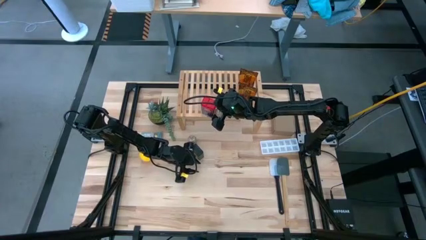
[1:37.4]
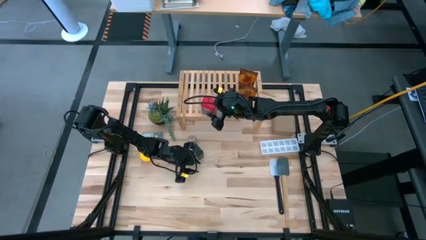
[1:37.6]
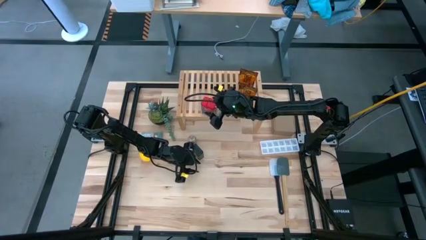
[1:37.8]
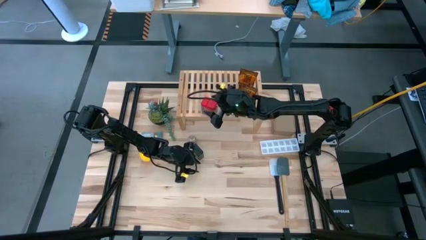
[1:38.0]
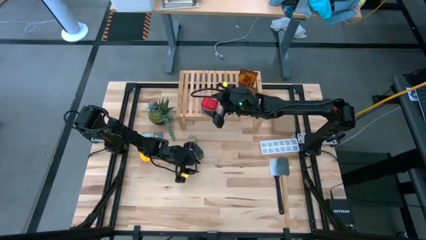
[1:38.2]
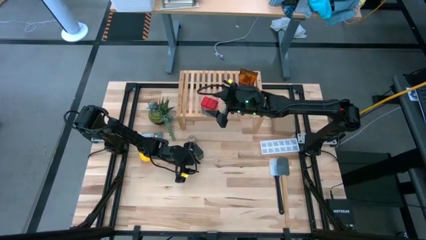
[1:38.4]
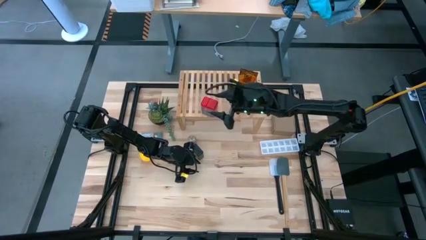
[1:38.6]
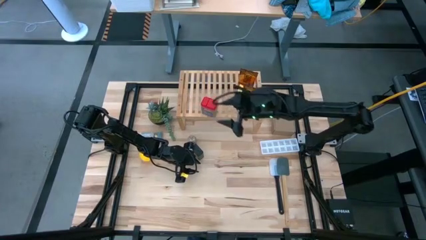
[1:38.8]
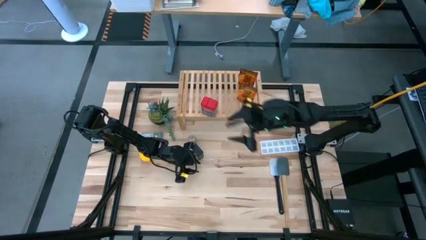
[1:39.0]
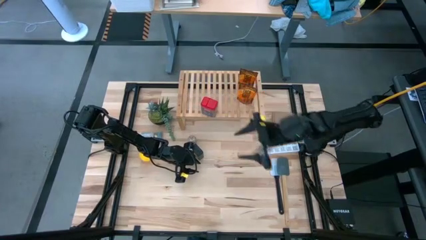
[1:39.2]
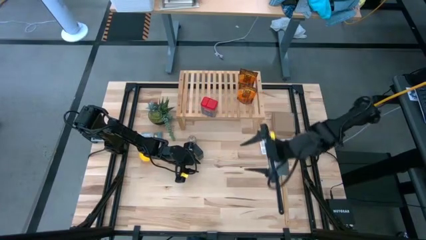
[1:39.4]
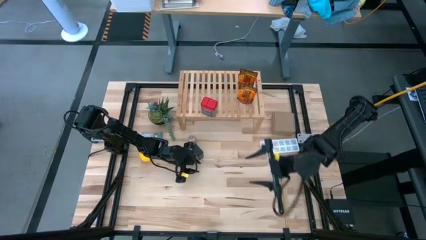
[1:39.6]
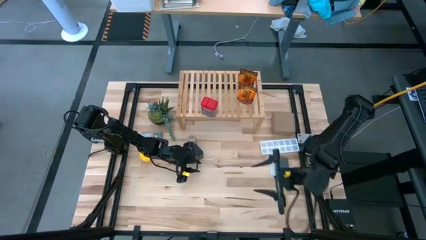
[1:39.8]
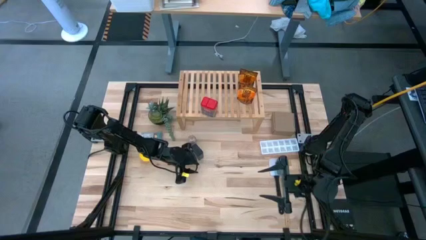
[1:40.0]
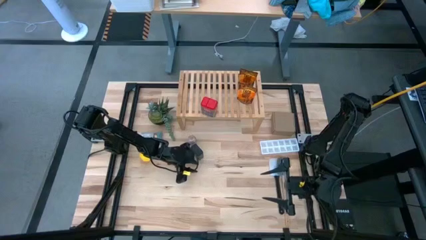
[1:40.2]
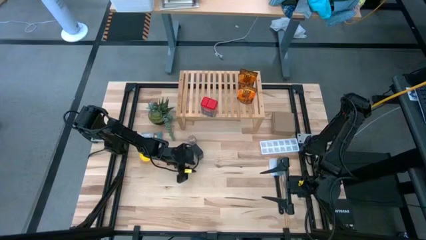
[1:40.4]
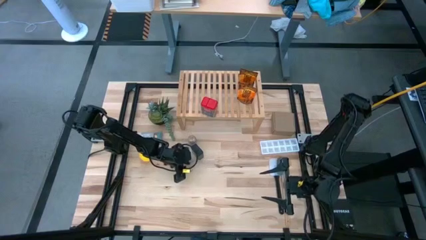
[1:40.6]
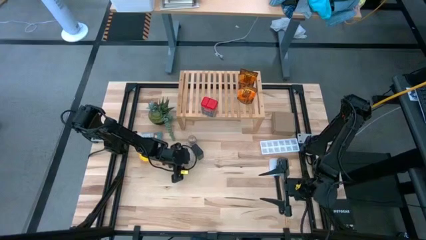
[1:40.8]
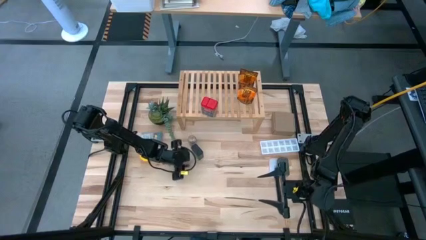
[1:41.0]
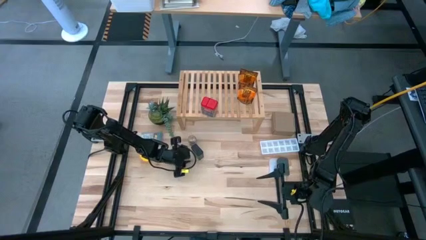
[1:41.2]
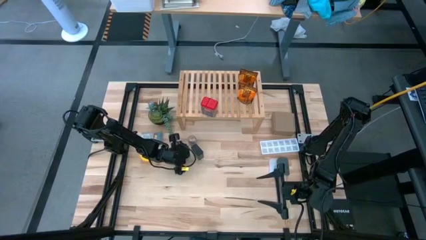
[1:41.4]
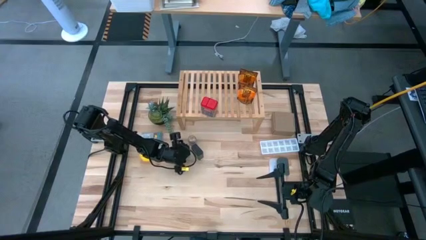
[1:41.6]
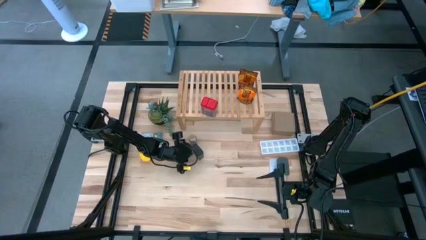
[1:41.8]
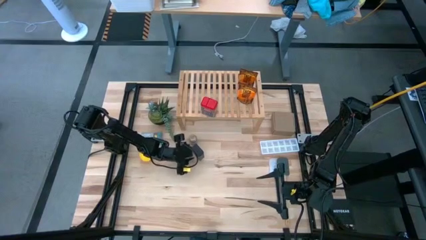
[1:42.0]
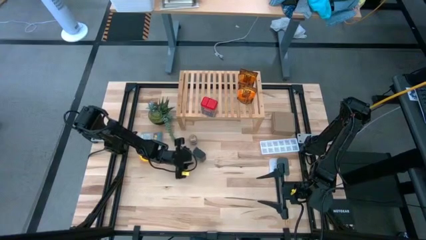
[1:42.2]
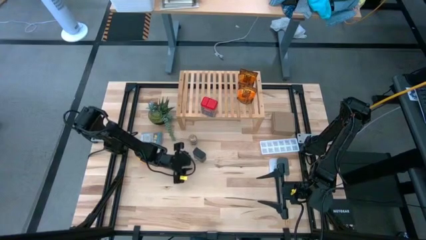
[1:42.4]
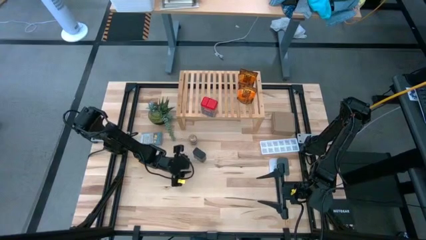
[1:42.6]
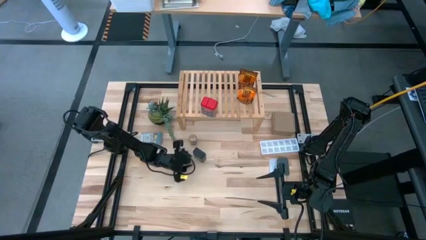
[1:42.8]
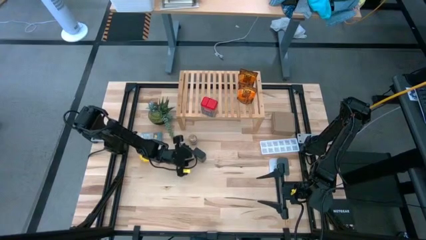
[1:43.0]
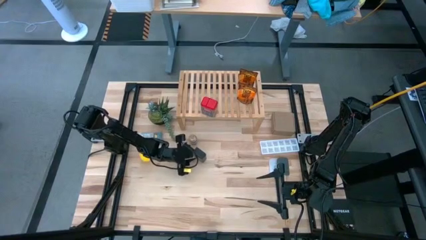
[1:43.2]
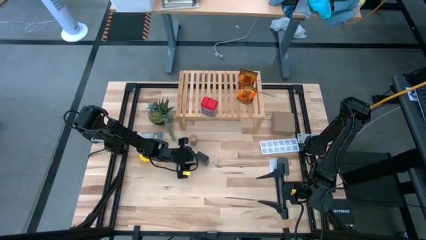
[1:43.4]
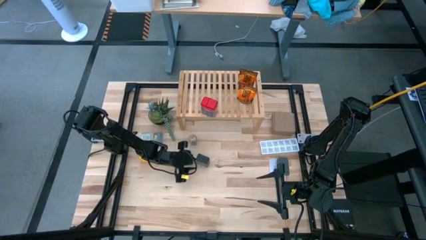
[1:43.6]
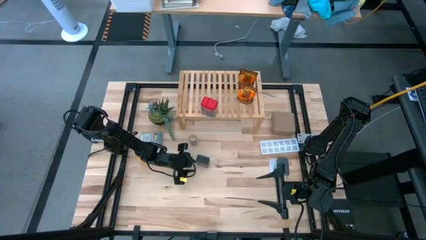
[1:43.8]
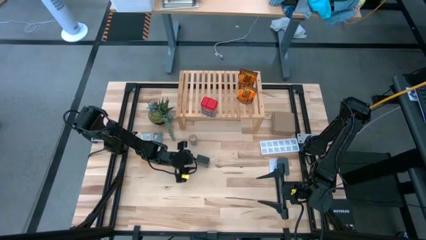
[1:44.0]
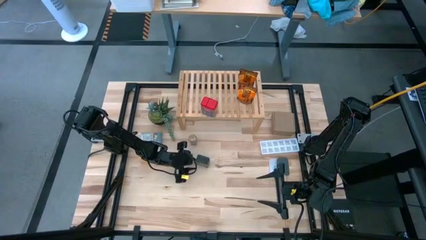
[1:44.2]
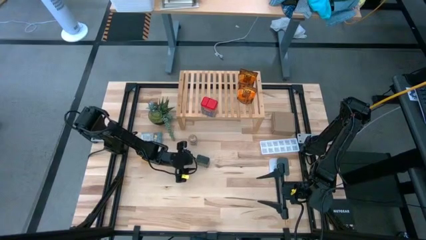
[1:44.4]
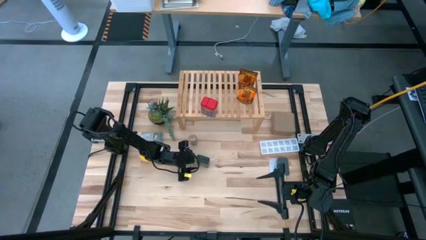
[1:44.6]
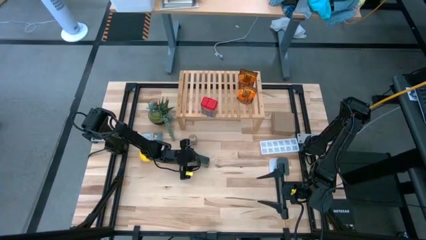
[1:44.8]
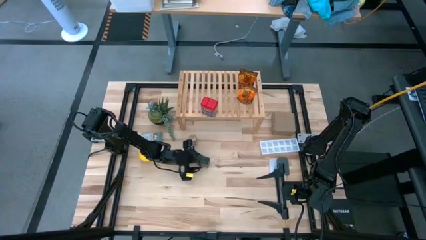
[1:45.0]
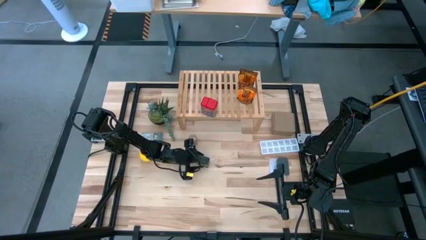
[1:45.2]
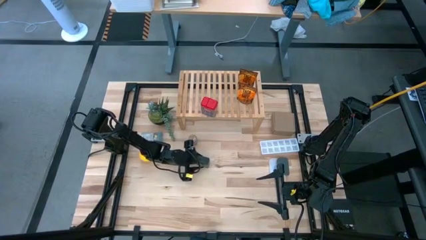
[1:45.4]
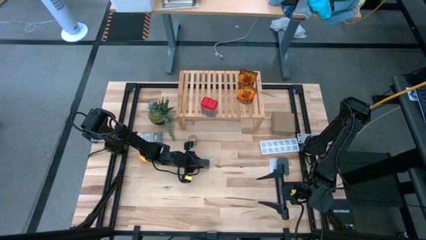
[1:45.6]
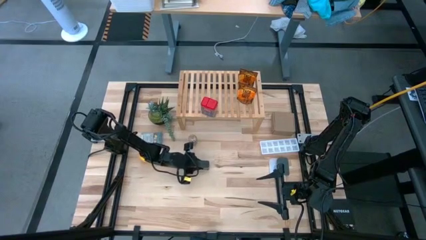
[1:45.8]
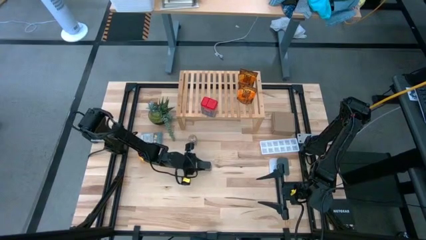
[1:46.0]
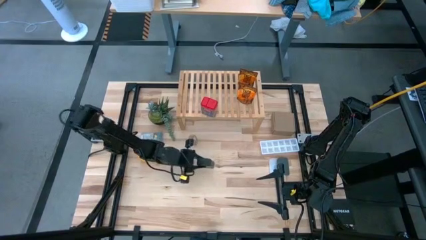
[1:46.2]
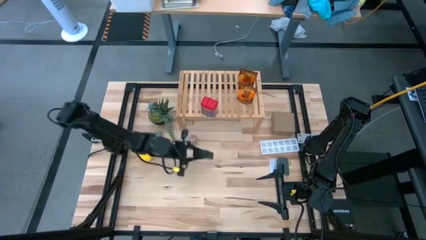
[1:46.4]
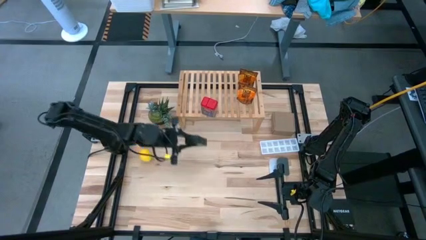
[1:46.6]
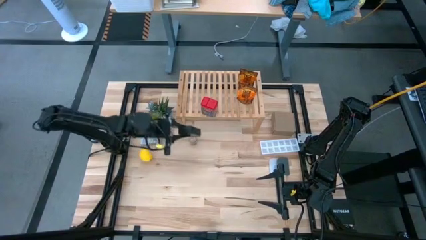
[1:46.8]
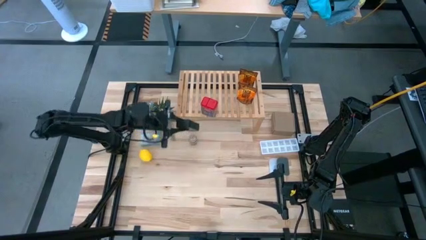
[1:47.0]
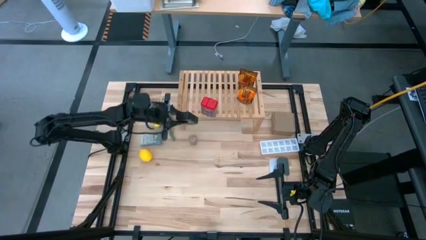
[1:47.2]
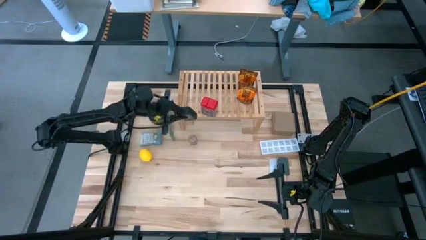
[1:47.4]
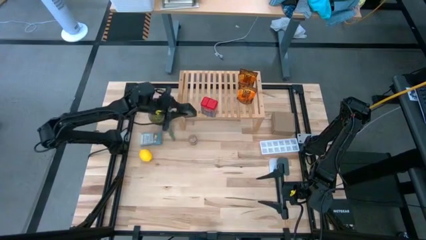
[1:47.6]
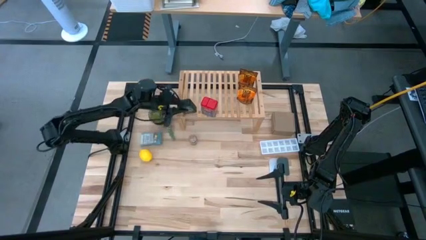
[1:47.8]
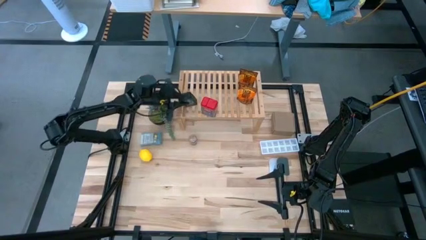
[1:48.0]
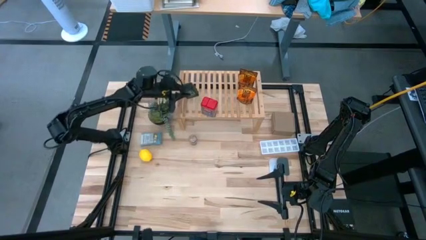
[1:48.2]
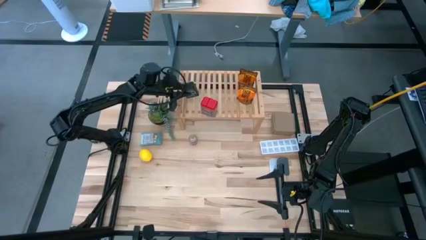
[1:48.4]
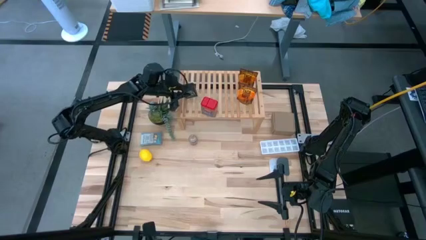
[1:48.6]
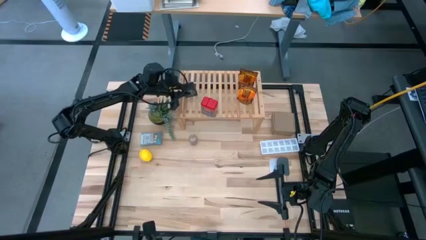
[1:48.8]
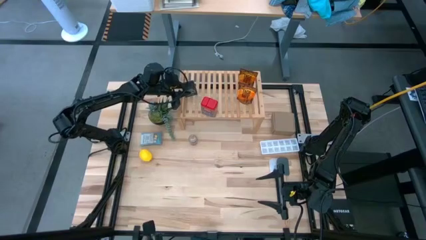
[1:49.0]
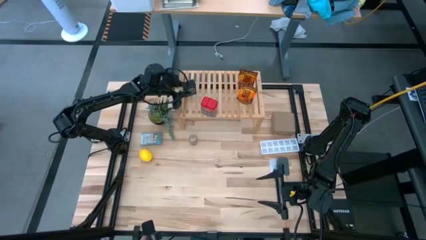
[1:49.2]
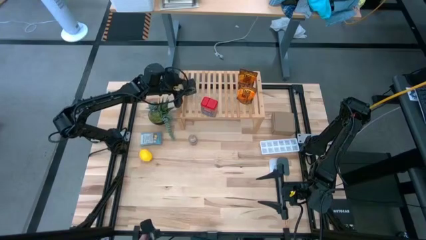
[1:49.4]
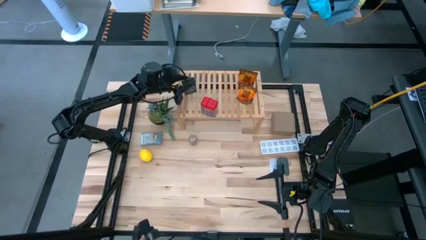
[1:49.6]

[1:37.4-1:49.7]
Task: Shelf spices
Put the black seasoning can on the shelf
